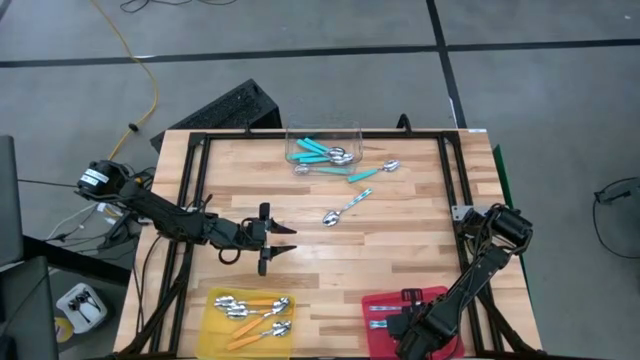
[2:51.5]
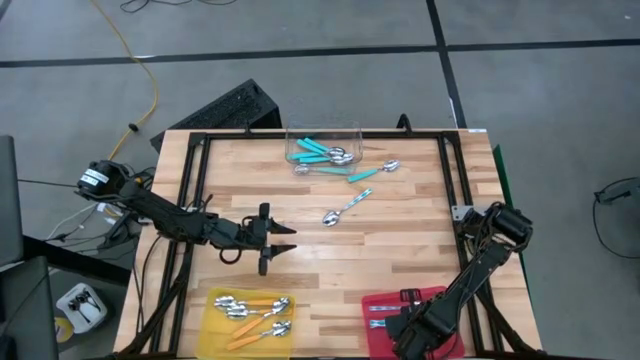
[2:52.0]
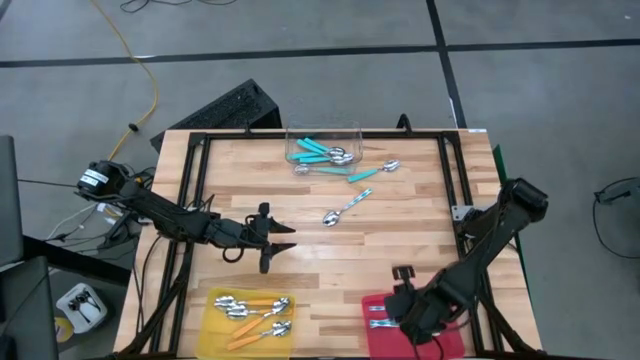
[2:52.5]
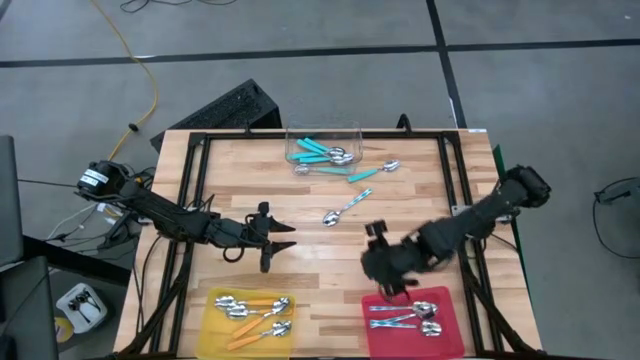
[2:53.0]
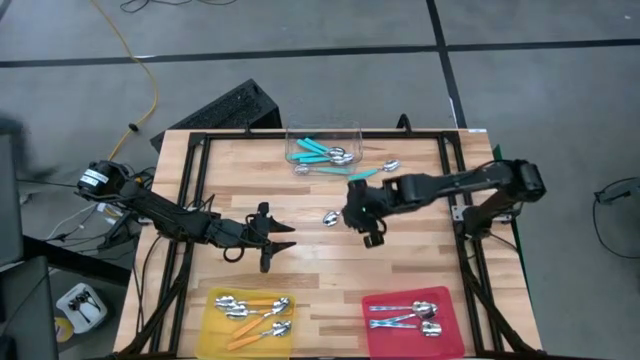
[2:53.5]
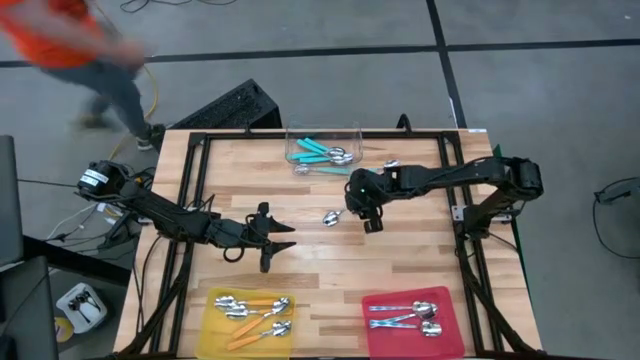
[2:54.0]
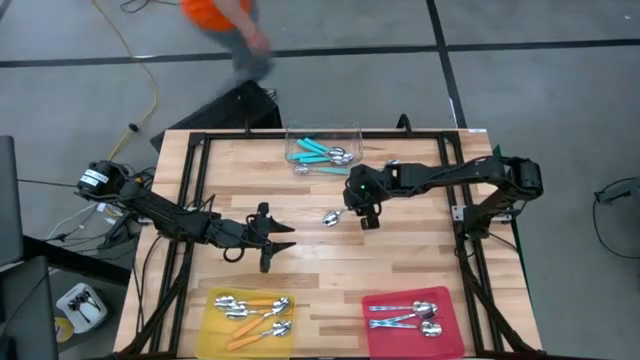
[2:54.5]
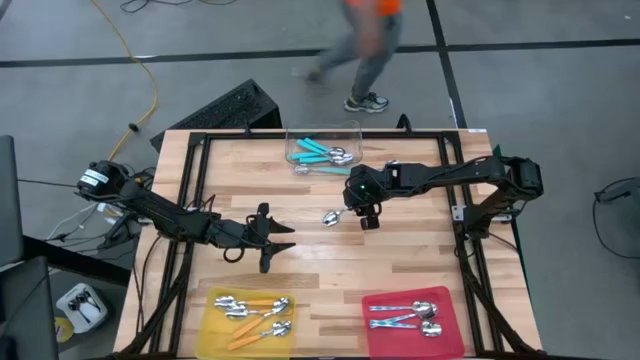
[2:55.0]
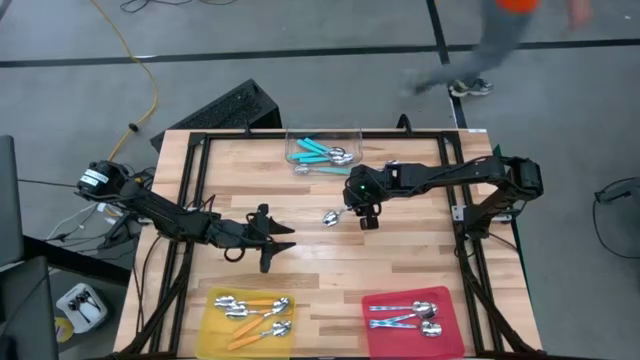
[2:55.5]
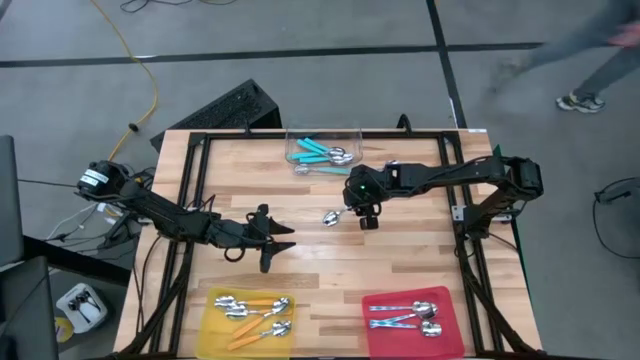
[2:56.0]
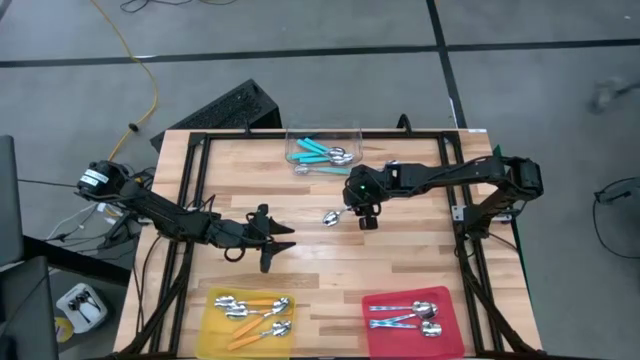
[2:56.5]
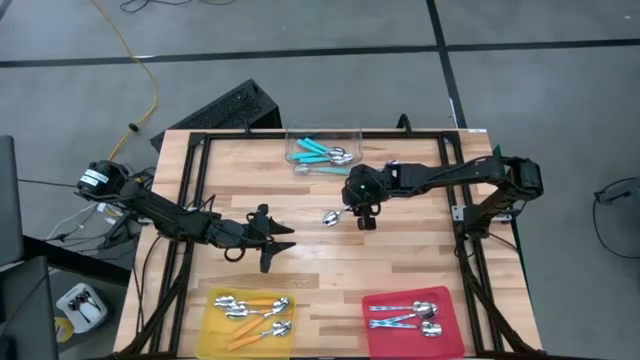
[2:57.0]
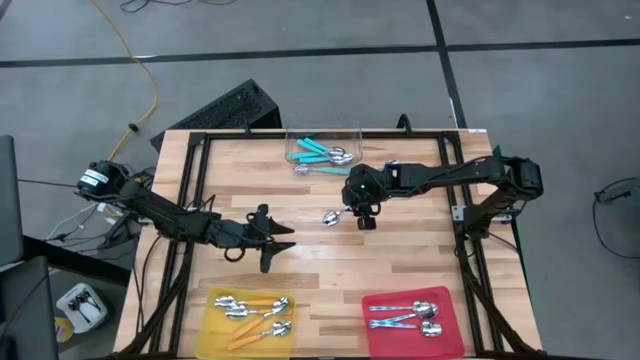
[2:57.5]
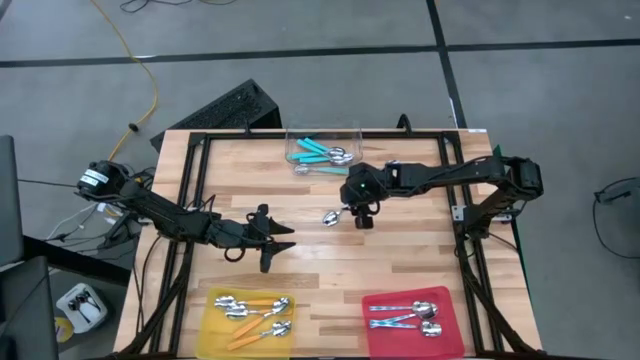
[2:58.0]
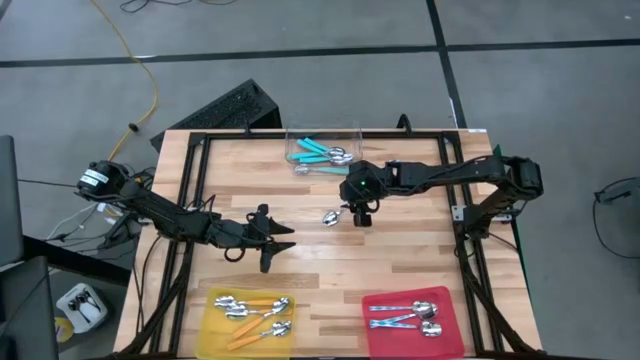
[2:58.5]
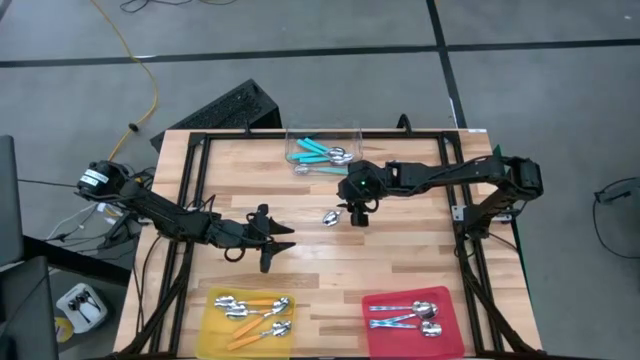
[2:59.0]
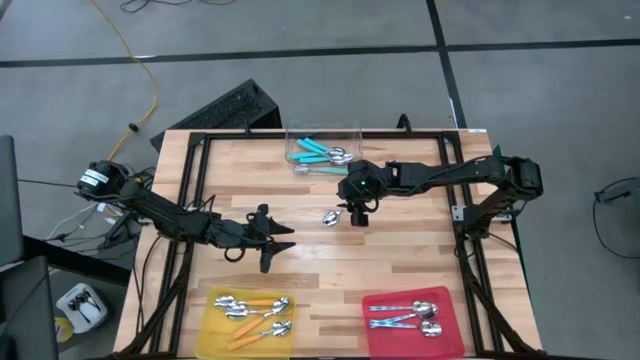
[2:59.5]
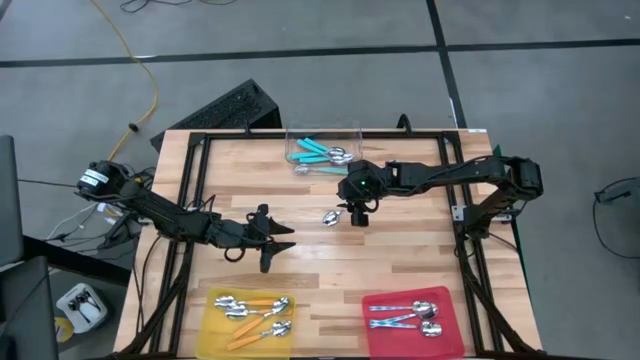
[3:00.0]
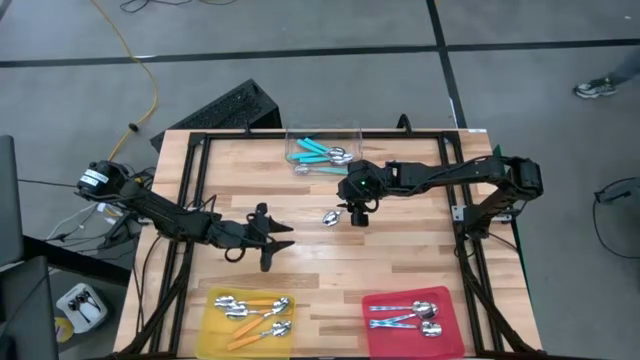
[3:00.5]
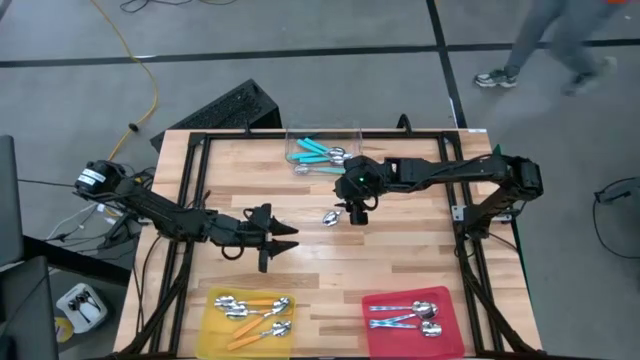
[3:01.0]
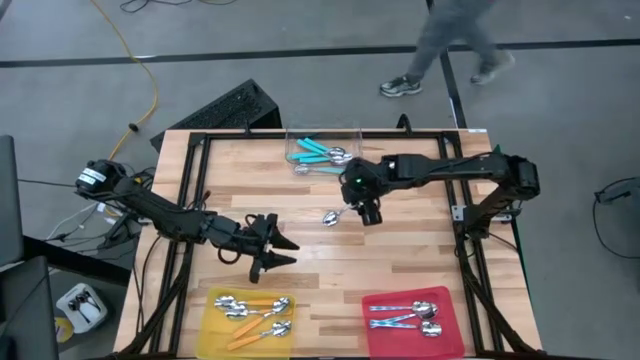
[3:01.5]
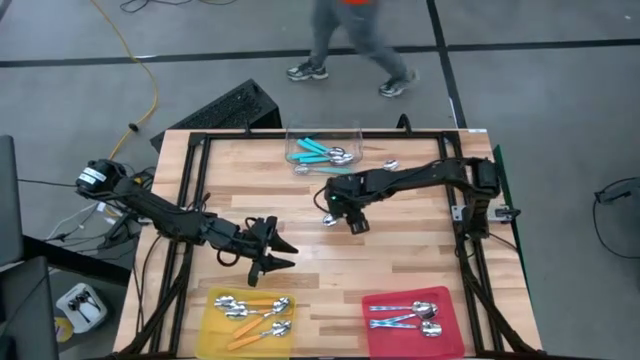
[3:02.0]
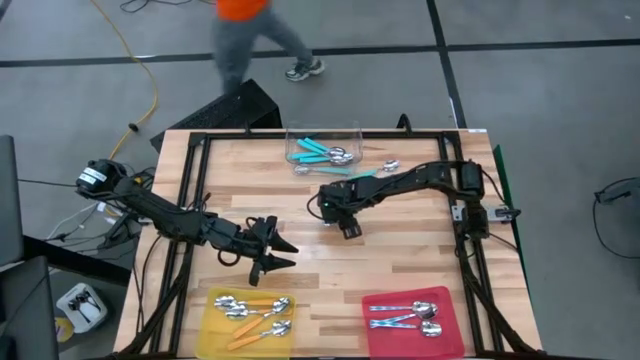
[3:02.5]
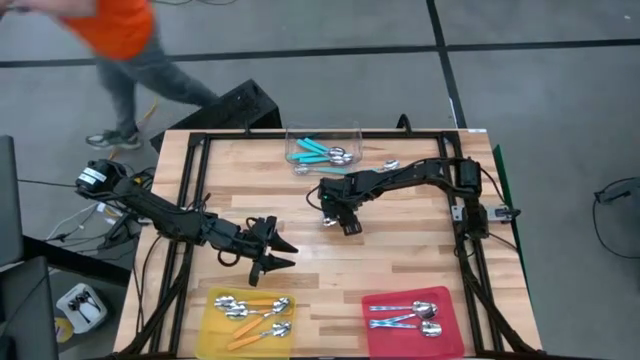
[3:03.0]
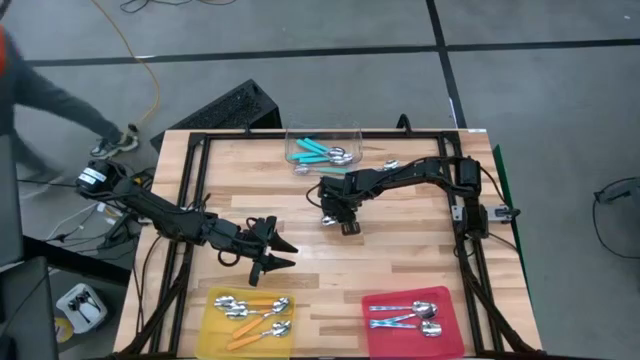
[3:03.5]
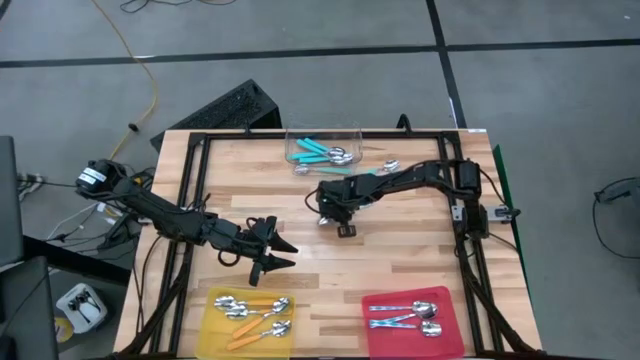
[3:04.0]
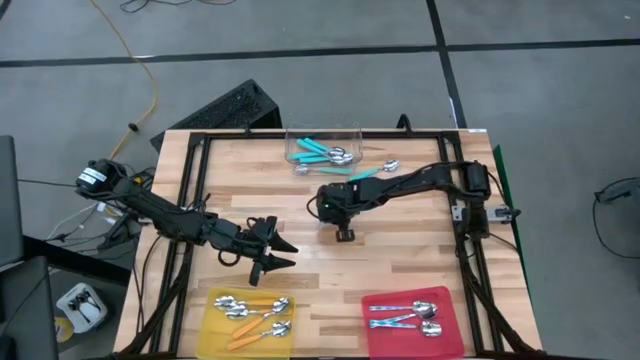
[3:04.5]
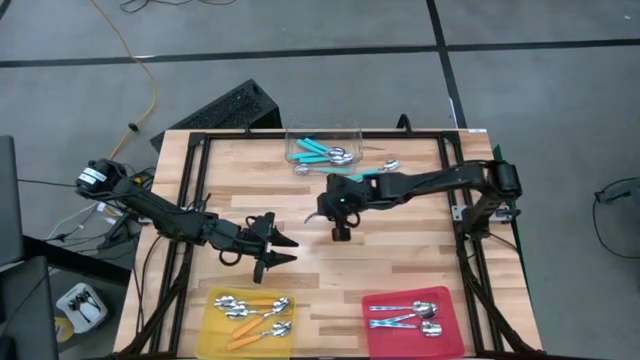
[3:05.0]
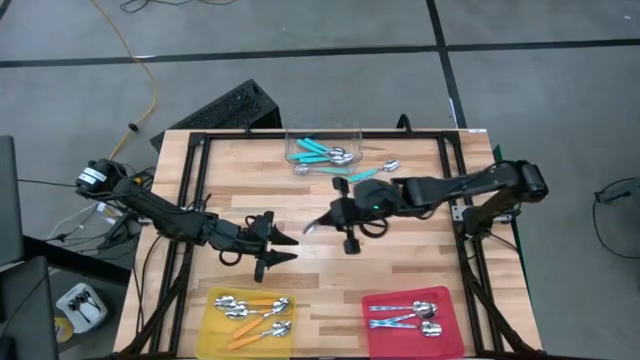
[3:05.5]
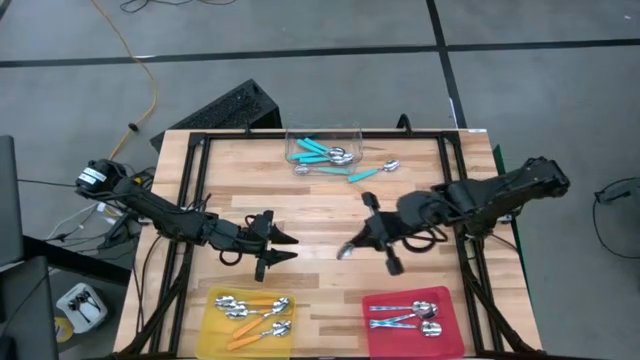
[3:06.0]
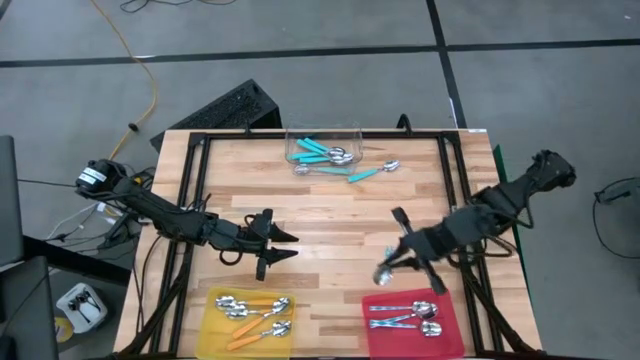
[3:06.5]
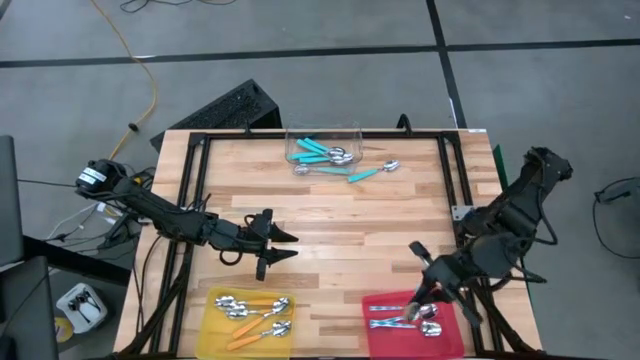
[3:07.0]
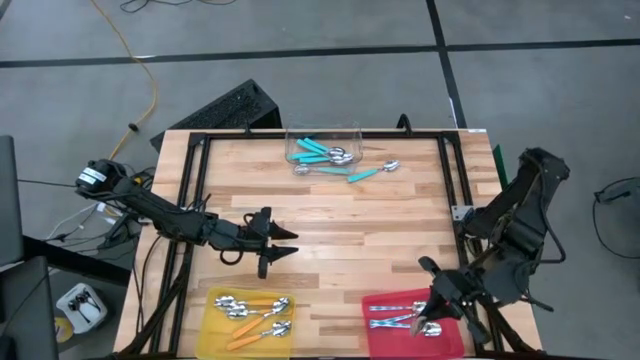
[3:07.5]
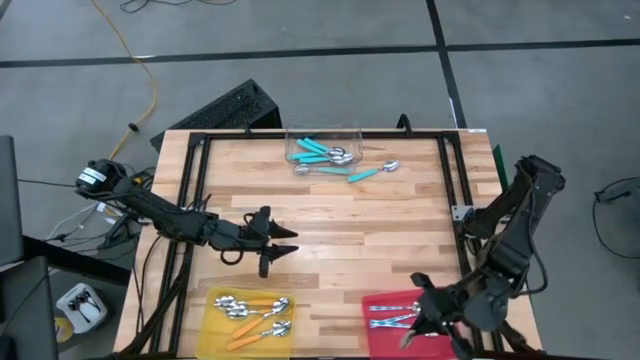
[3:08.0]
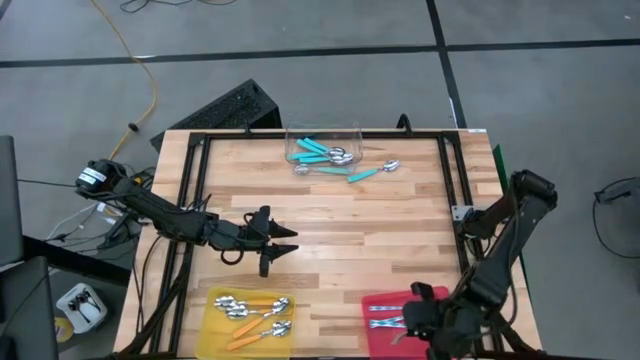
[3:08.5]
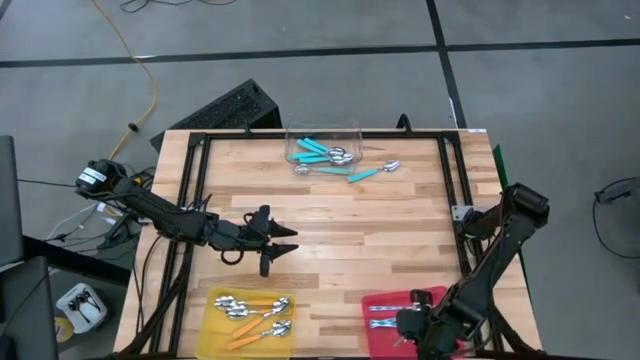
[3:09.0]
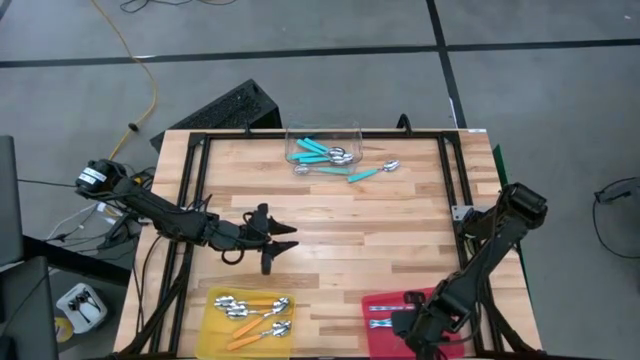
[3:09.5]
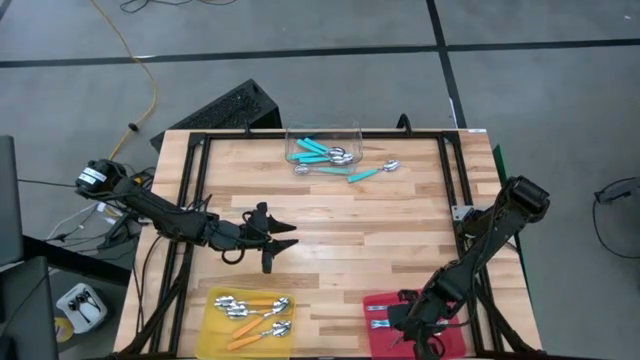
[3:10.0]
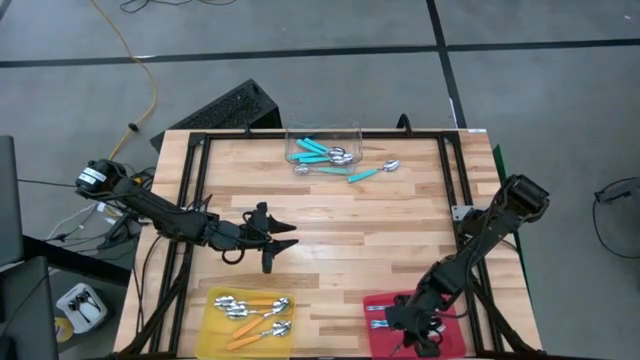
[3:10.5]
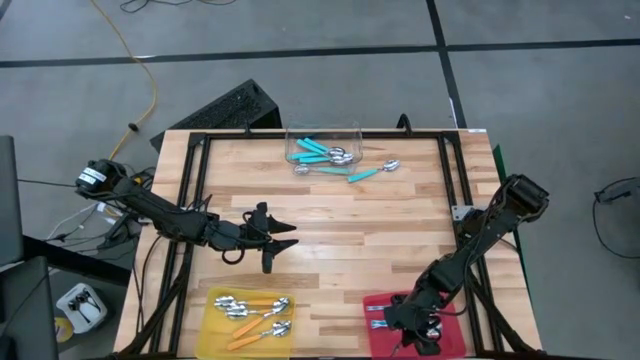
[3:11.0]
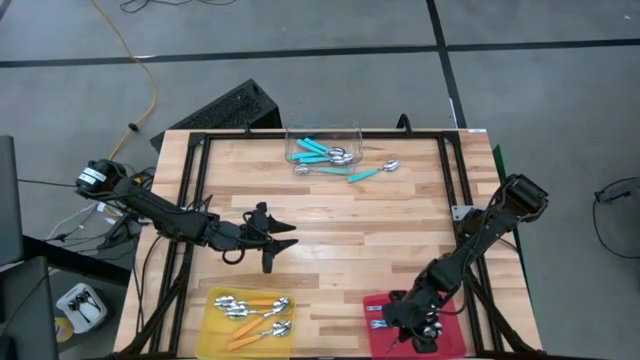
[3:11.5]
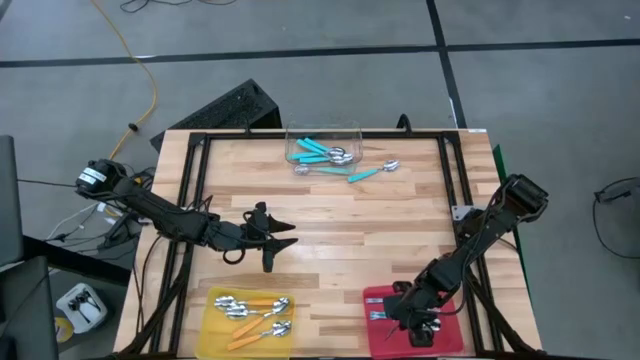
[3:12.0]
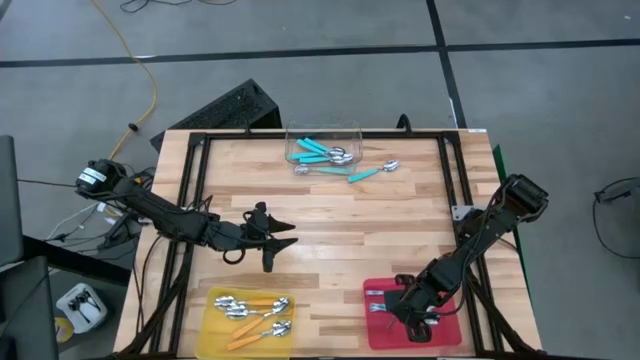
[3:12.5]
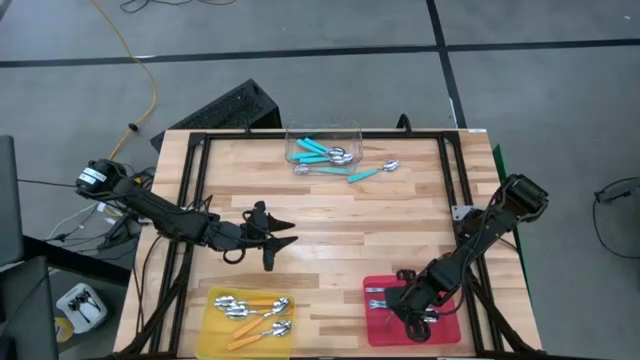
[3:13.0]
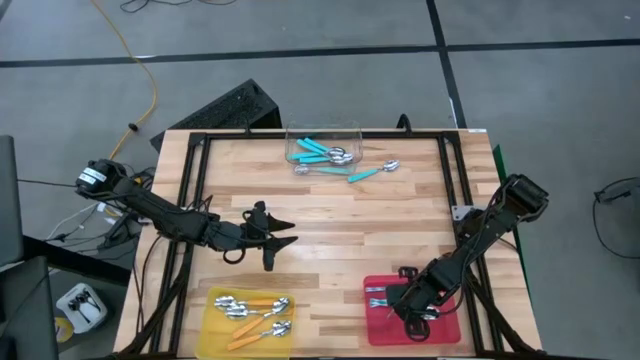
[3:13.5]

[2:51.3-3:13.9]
Task: Sort silverware by color (type)
Put the white and blue spoon into the red bin
